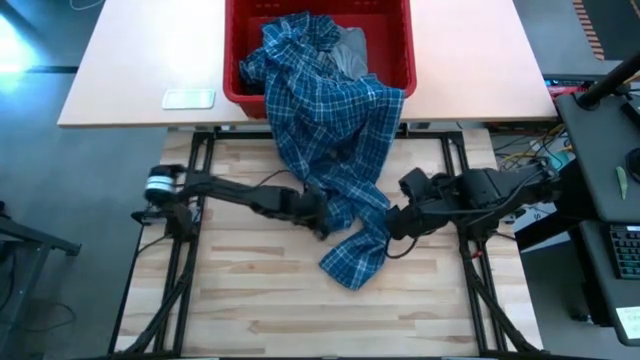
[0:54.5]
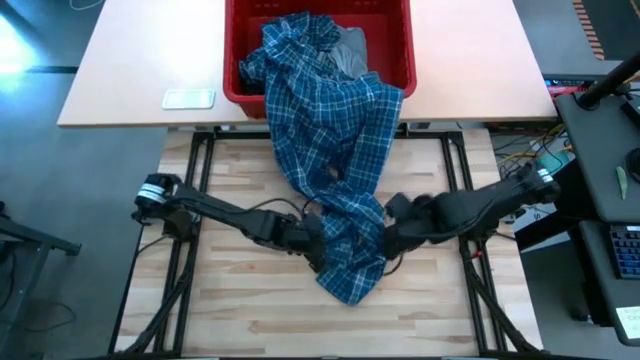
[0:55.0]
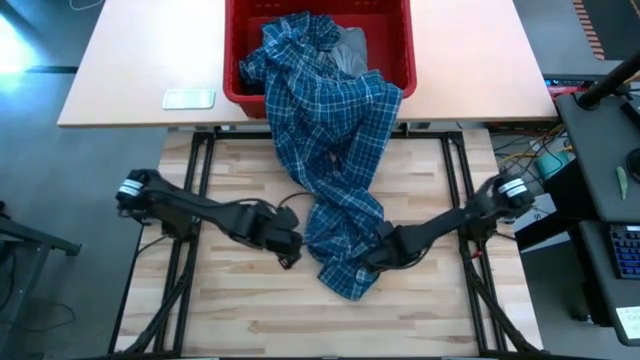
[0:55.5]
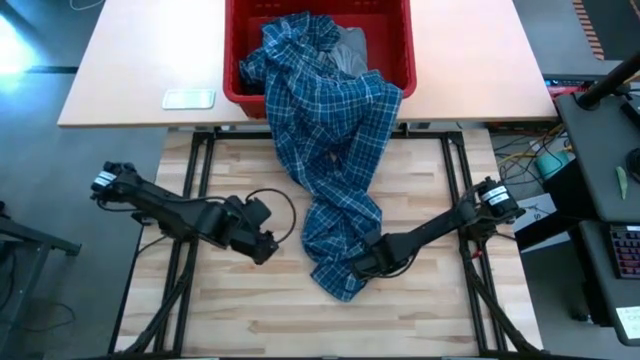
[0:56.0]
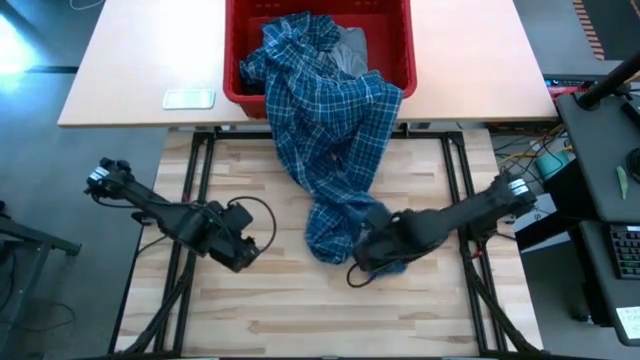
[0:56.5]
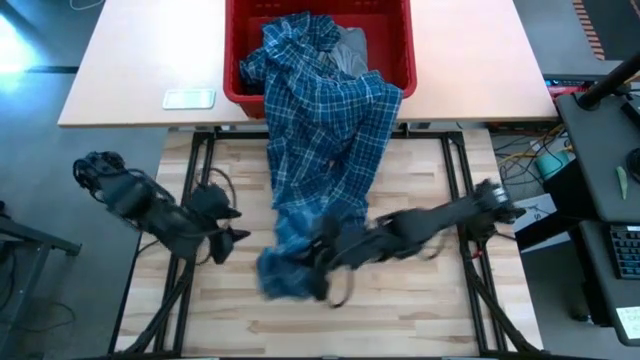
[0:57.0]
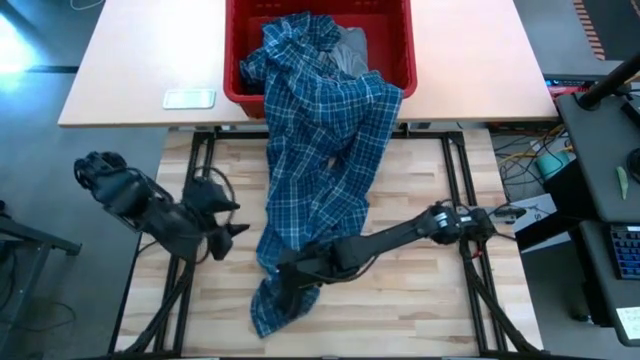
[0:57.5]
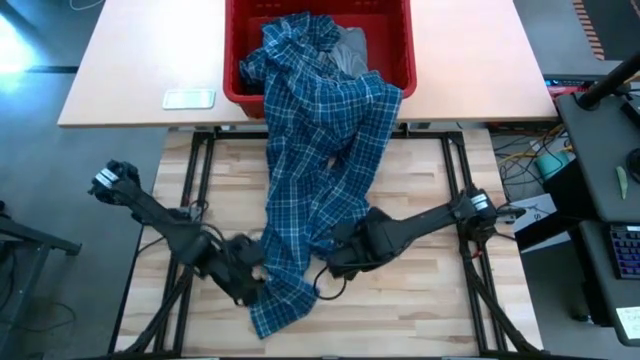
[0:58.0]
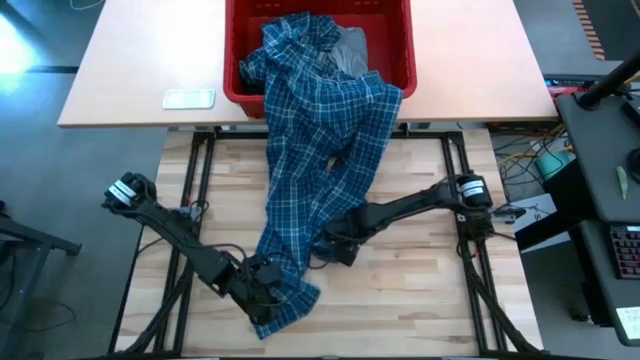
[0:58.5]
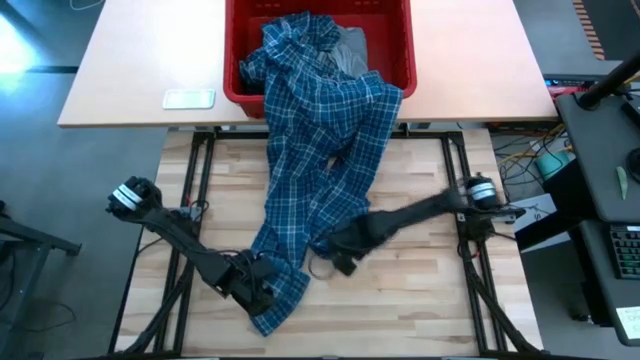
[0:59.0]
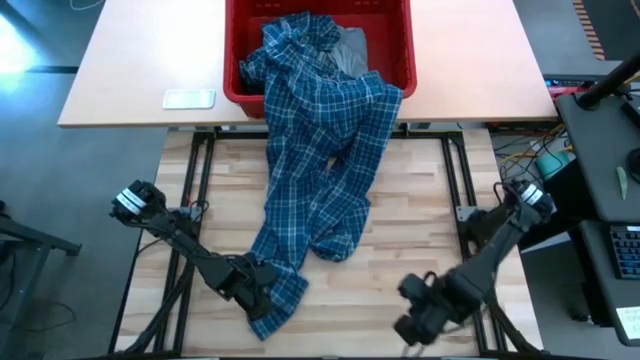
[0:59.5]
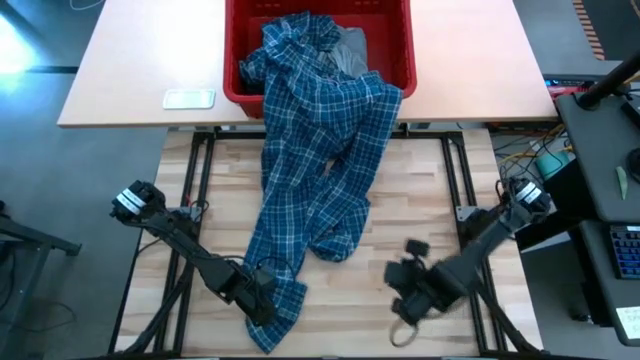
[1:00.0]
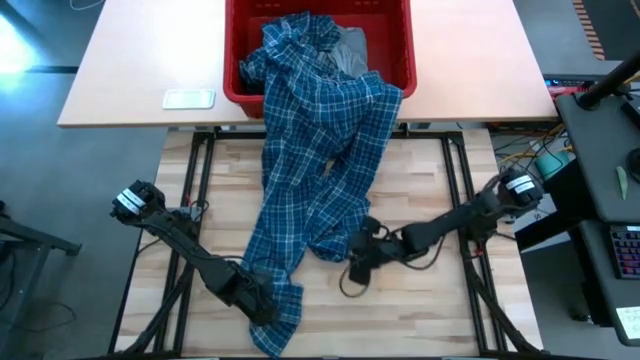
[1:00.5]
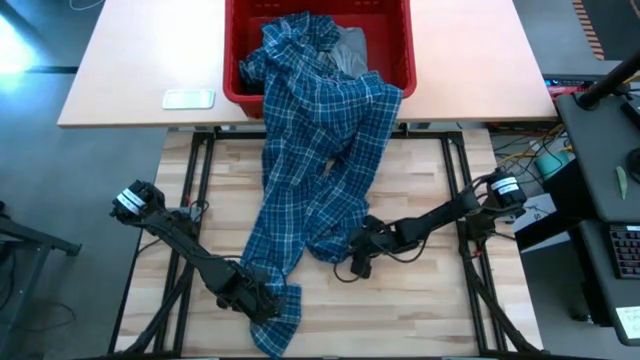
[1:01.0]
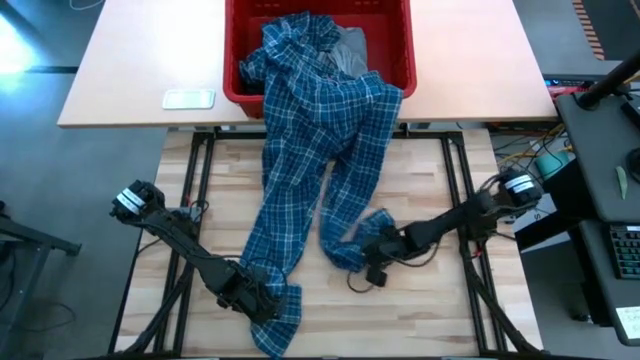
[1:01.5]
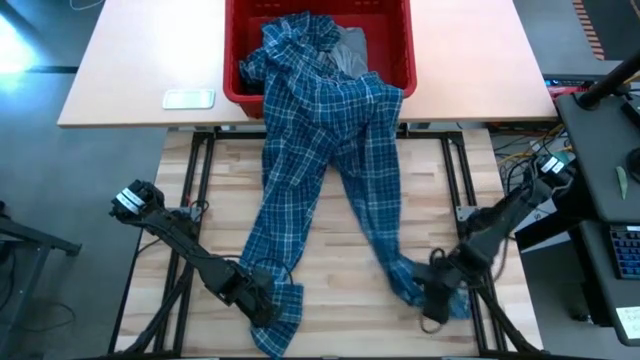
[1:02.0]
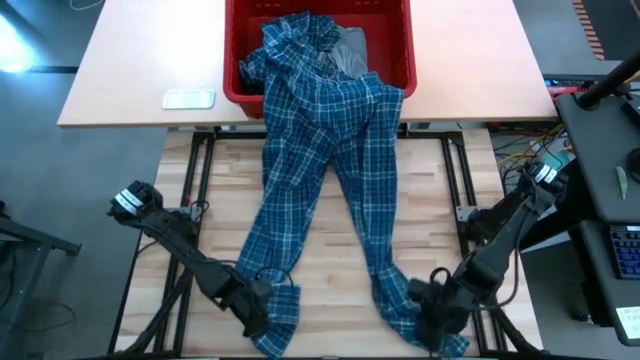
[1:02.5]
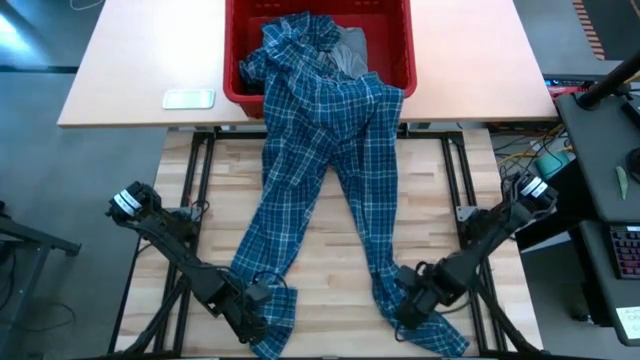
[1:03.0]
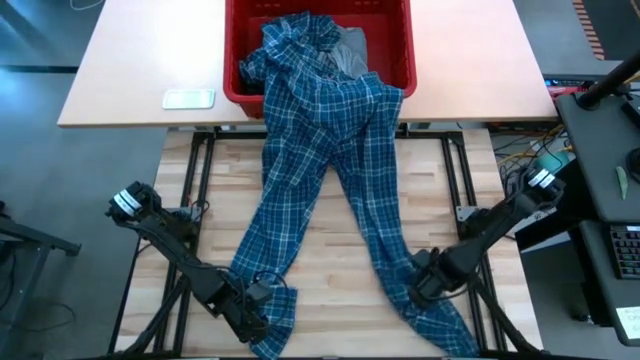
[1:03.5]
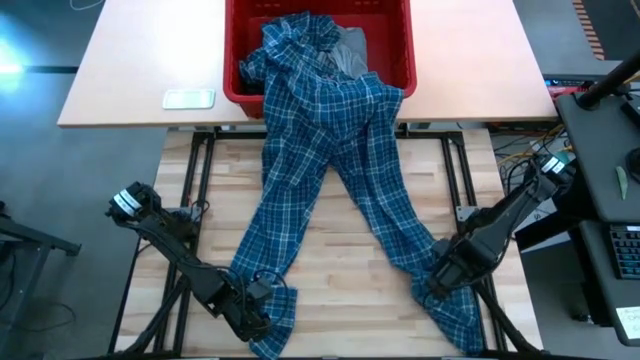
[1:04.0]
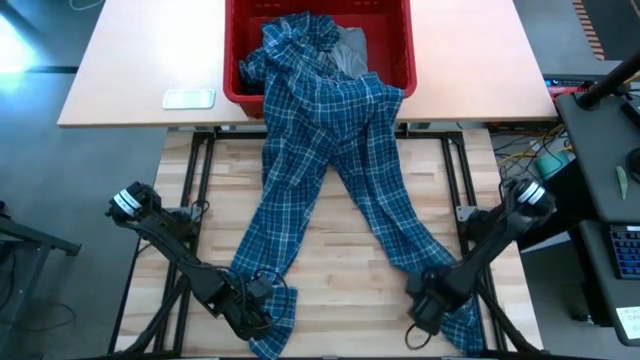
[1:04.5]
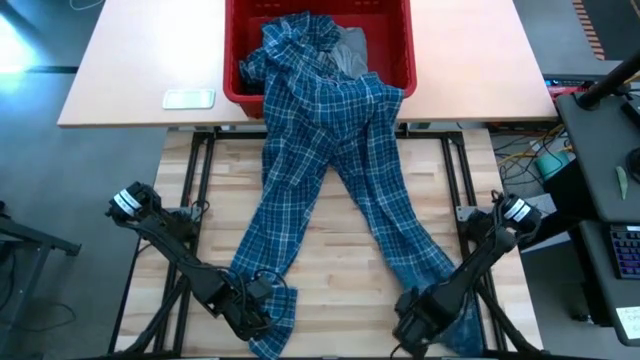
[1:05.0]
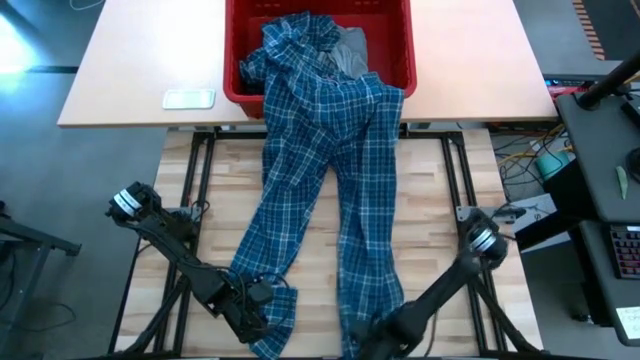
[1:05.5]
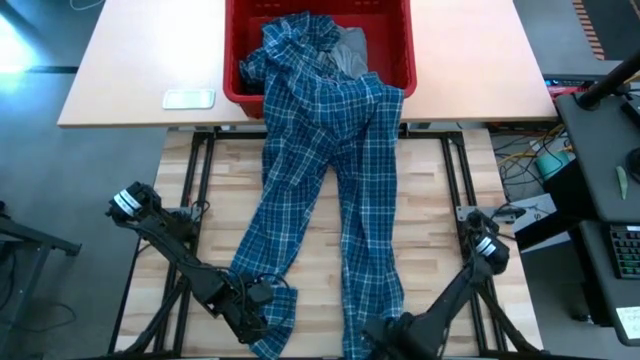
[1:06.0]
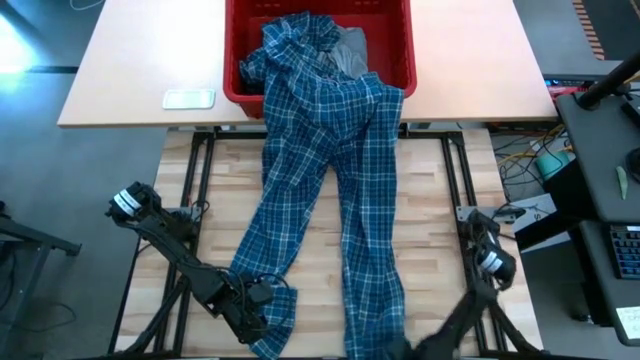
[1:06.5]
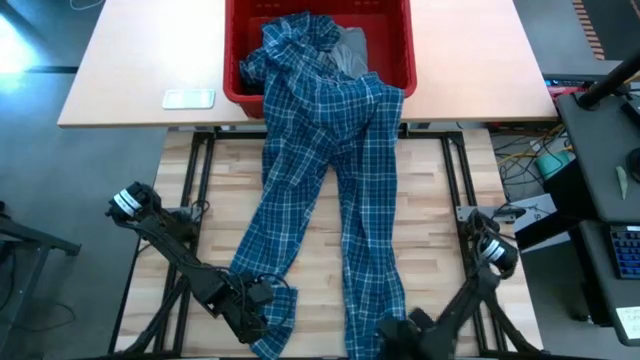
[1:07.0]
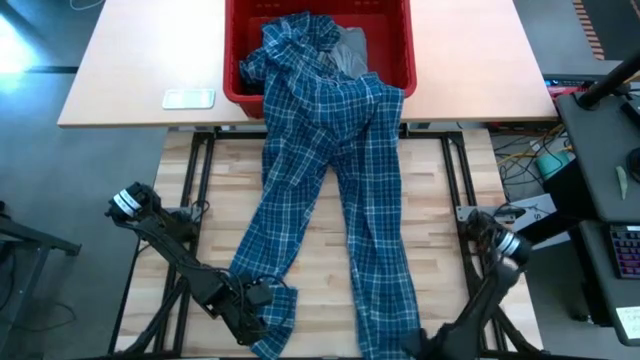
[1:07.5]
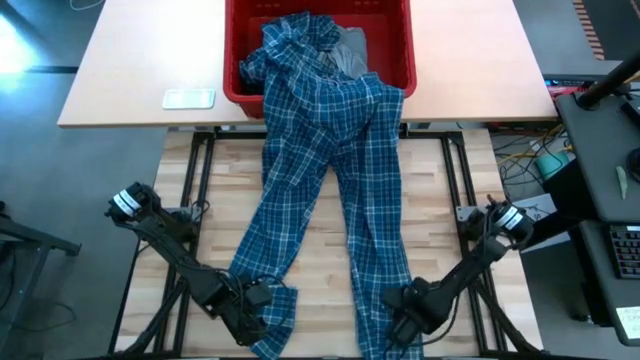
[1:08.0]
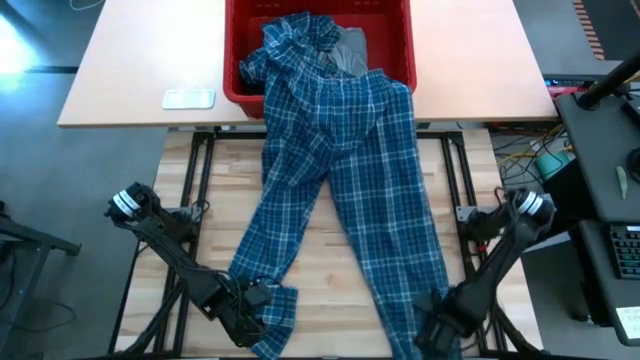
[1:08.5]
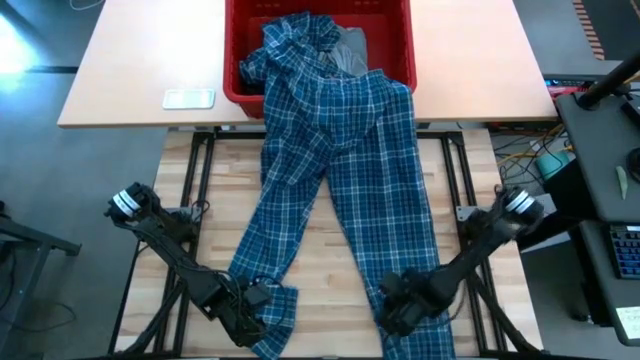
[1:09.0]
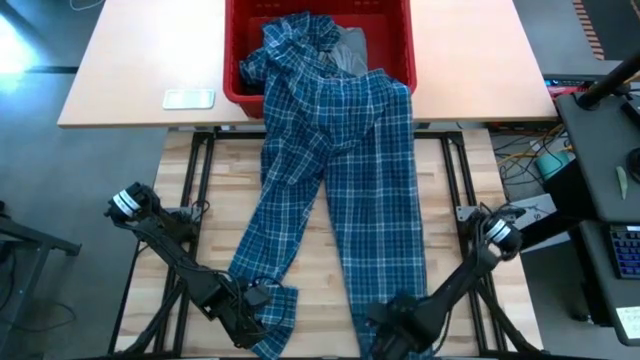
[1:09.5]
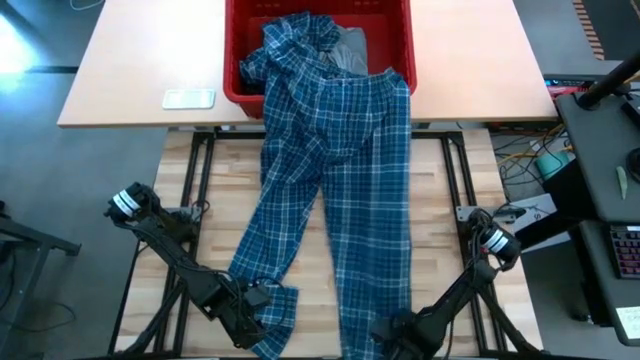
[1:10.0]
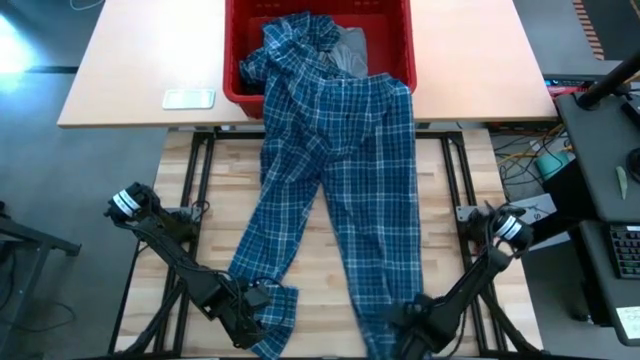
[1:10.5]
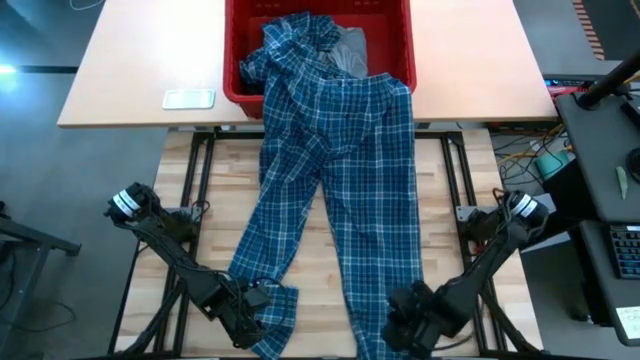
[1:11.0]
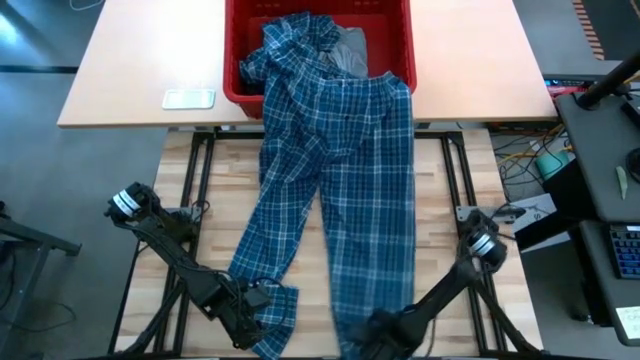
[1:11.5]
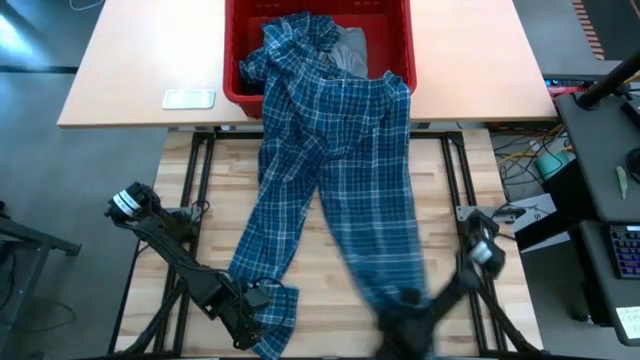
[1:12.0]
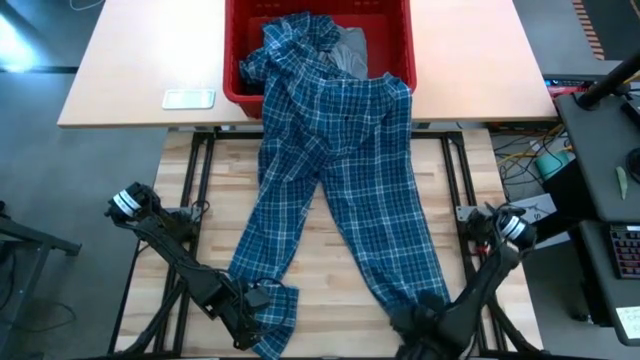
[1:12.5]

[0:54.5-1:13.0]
Task: Fold Laundry from Bin
Fold the blue patterned pants

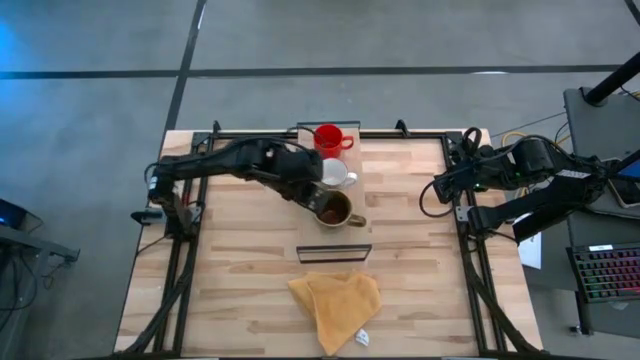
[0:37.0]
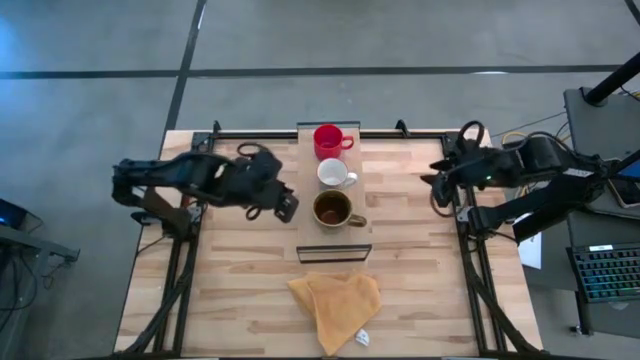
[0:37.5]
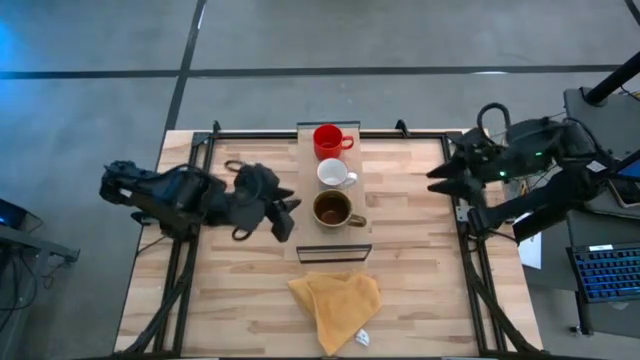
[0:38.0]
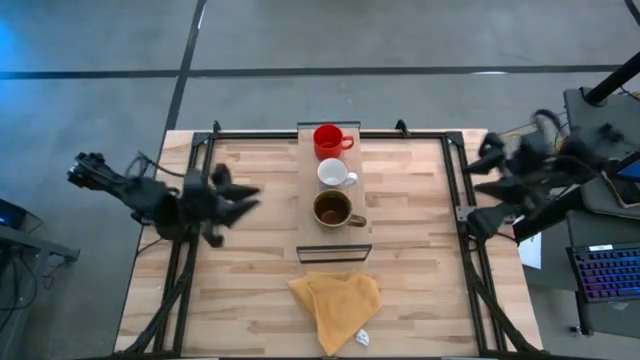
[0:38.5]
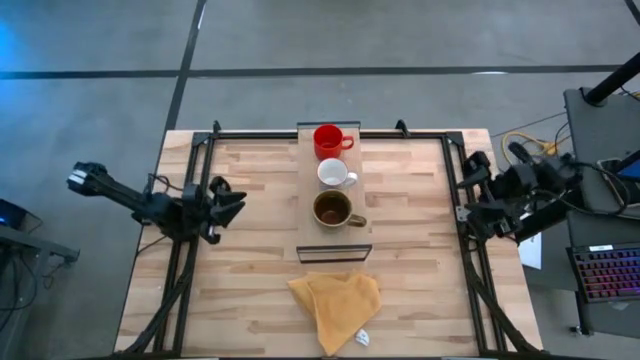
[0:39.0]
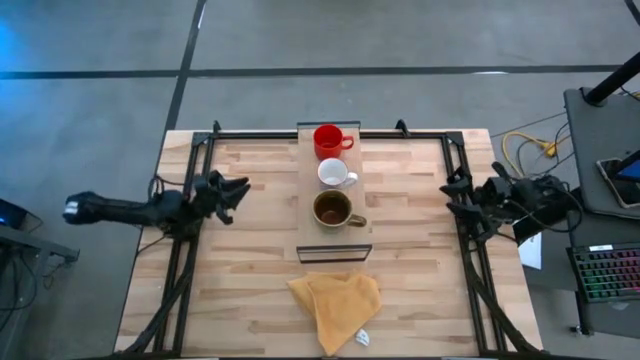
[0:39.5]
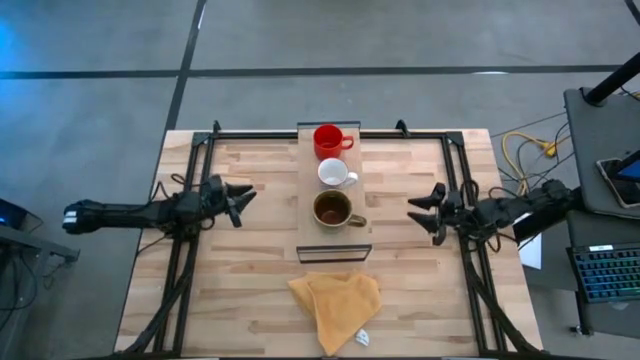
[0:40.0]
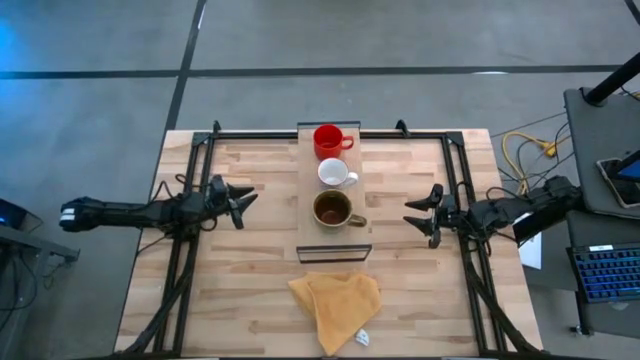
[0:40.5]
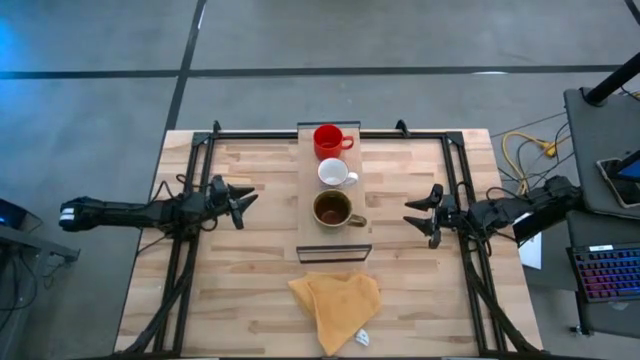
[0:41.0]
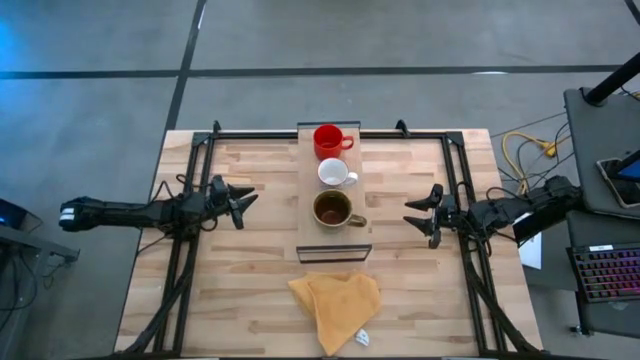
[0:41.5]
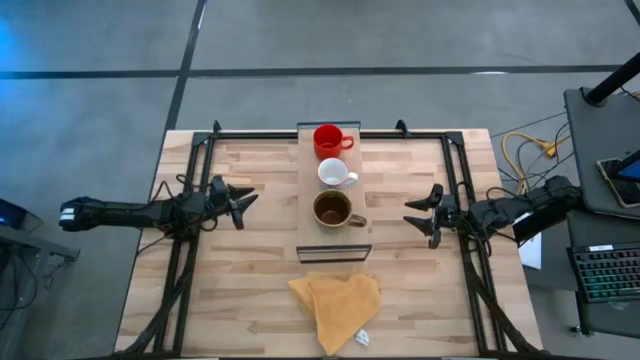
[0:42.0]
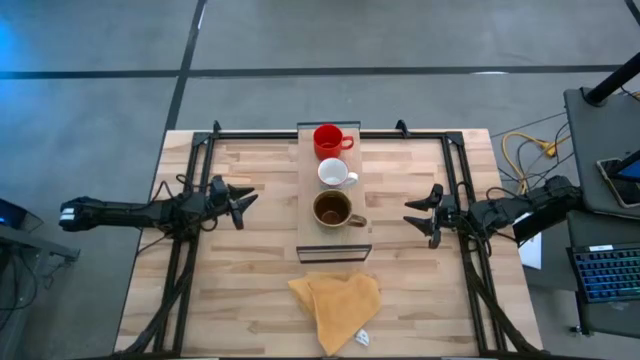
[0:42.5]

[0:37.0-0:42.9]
Task: Stack small to large cups/mugs on shelf
Return to Home Position
